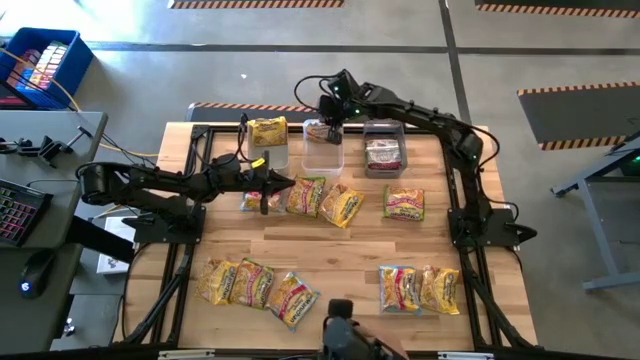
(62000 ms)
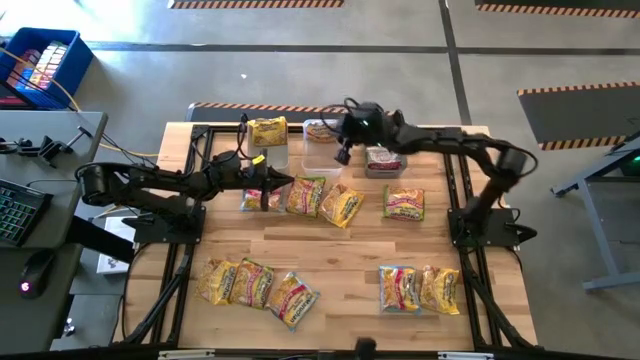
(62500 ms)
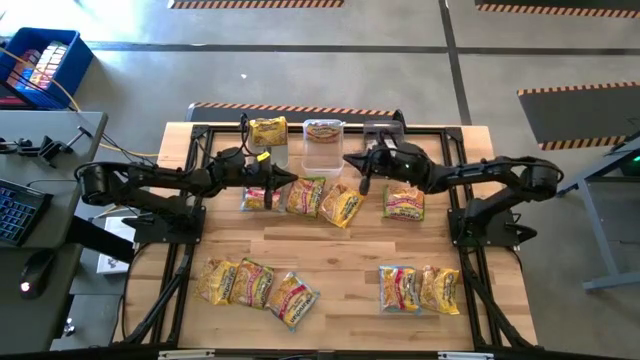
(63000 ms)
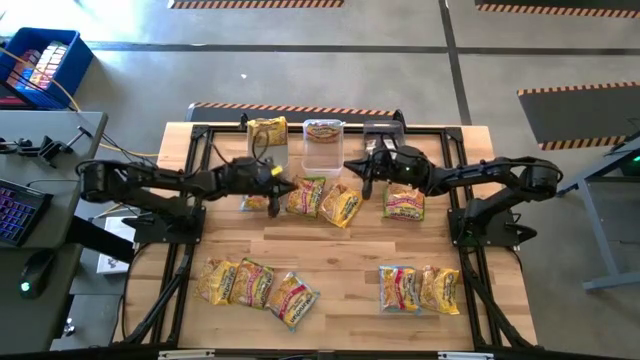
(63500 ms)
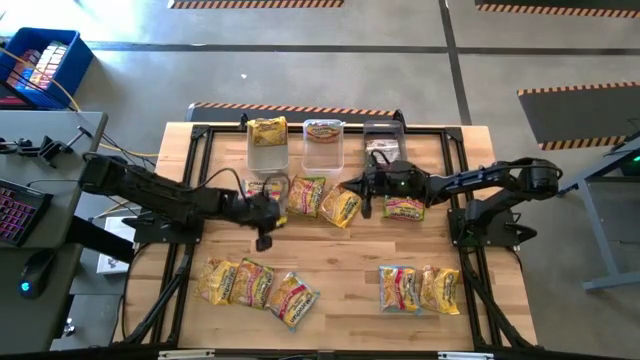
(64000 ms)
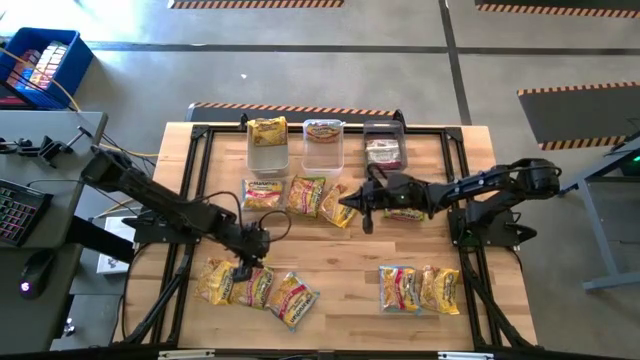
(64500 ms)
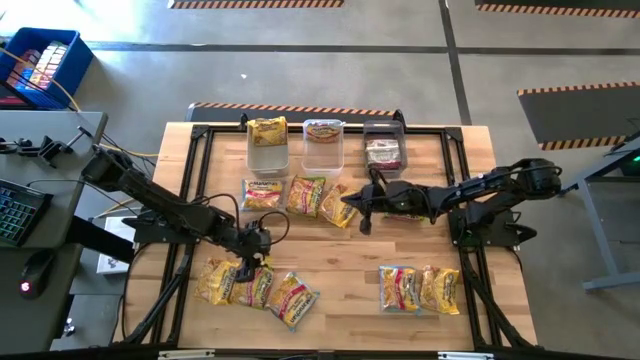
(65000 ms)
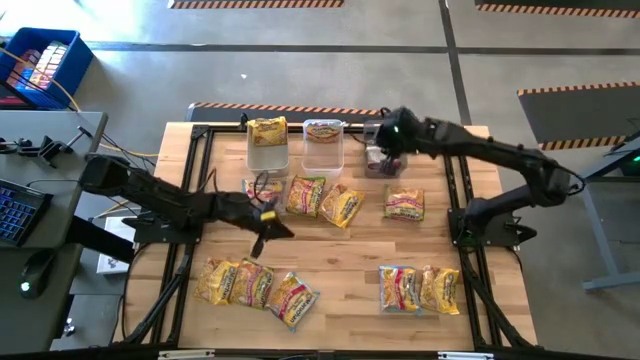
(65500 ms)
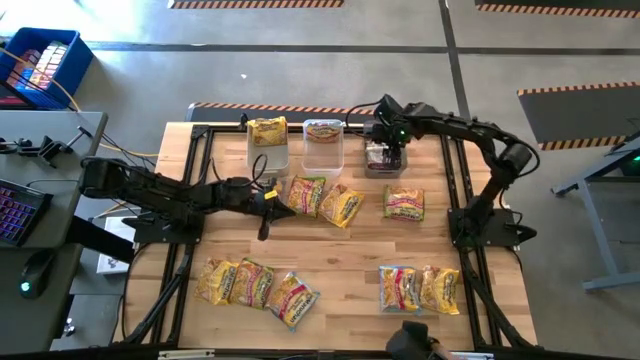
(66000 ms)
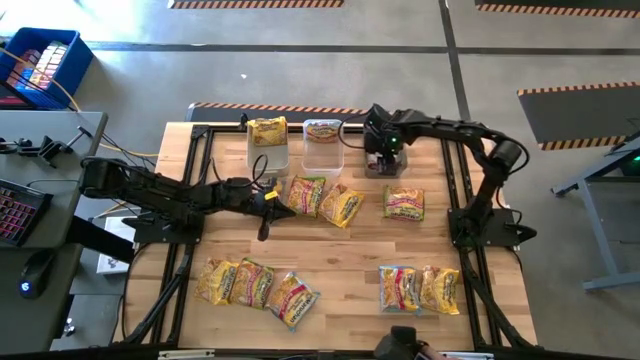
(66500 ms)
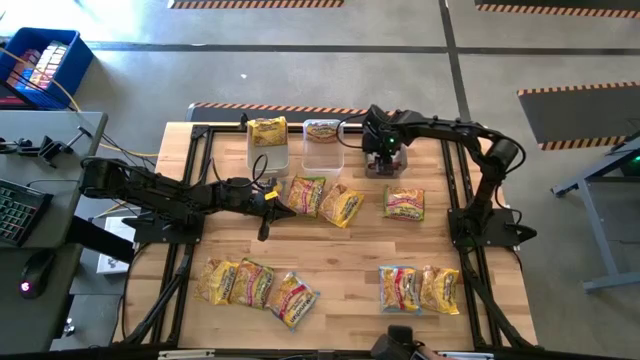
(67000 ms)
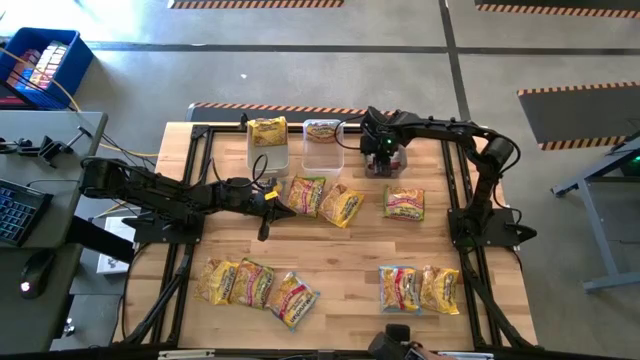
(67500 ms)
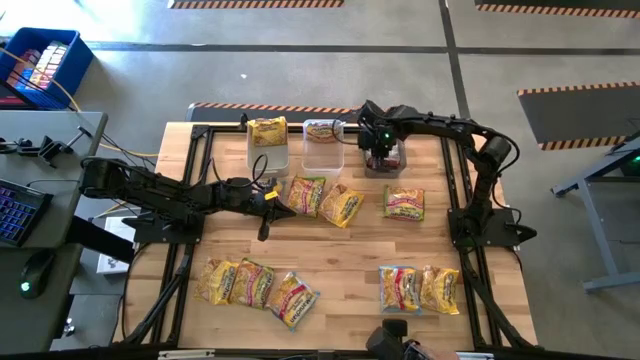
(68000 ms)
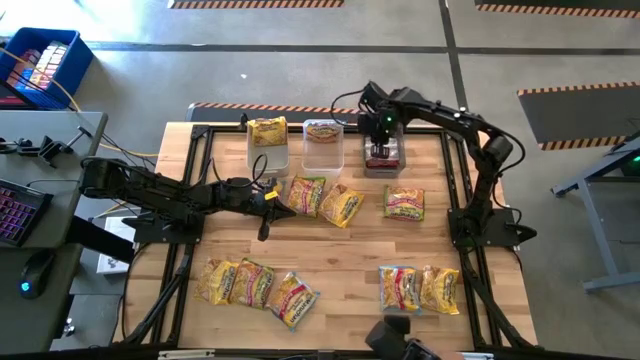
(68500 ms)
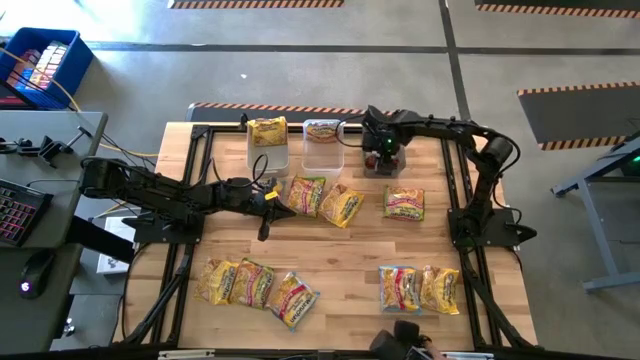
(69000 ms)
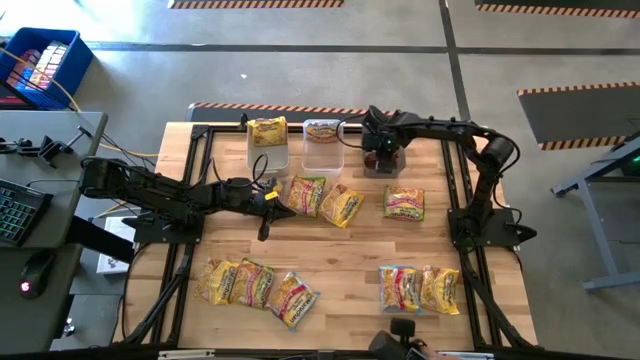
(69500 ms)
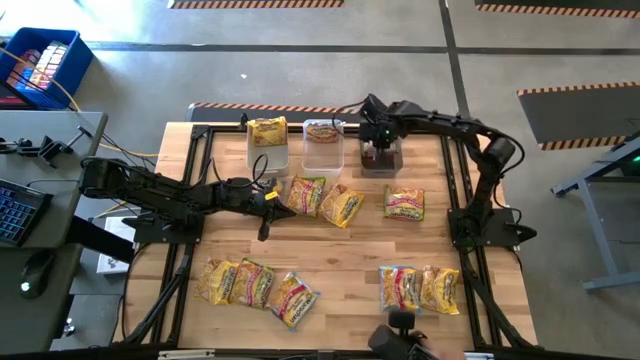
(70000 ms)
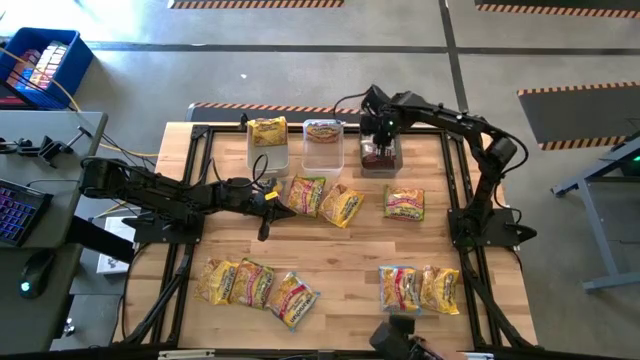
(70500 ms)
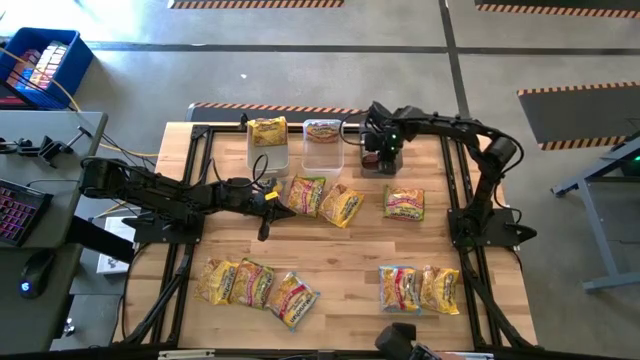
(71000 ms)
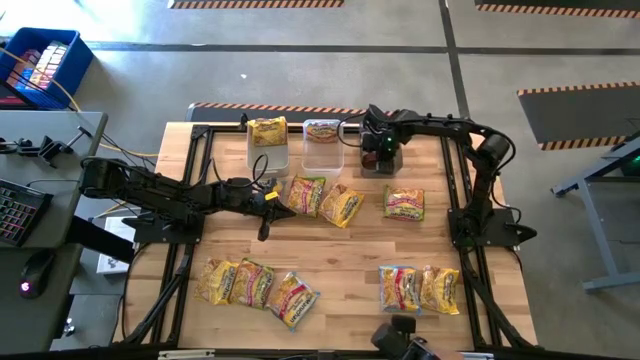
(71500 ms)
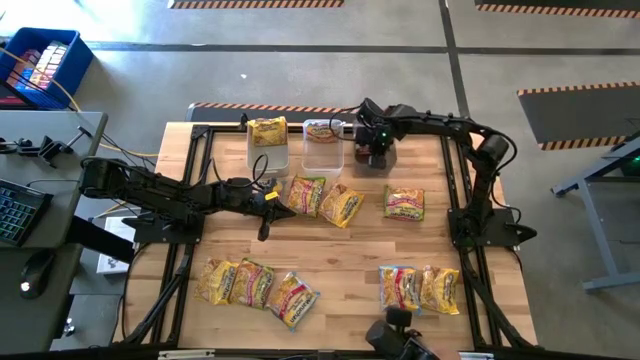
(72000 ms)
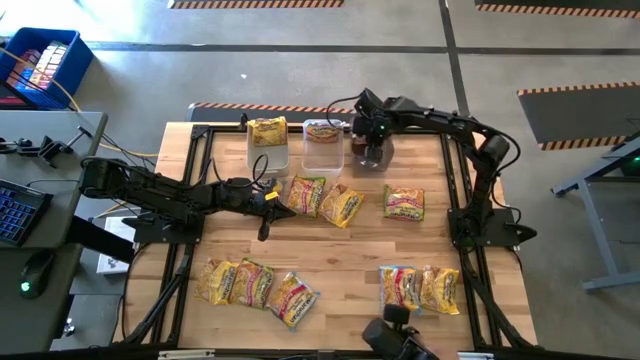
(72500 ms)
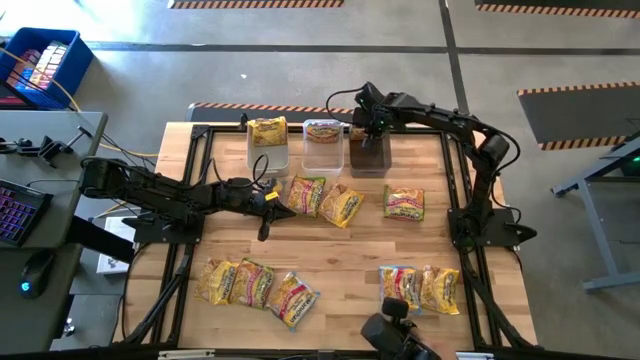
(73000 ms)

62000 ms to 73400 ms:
Task: Sort Maruchan noodles
Adjust the green noodle pack on the transparent black bin

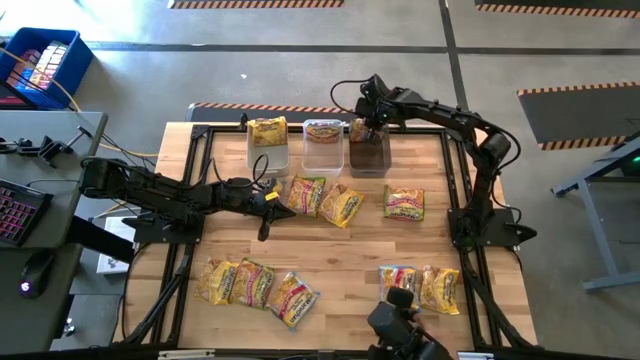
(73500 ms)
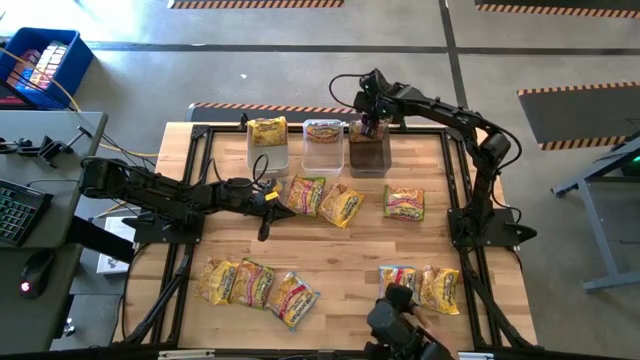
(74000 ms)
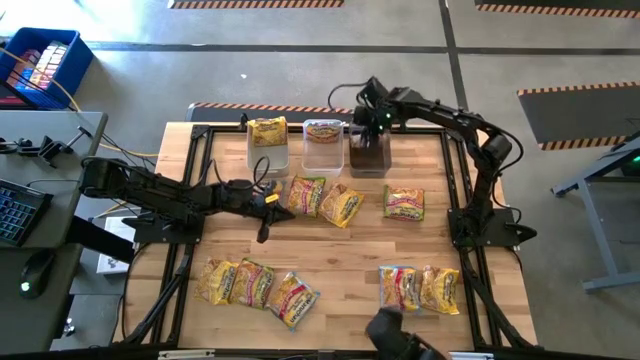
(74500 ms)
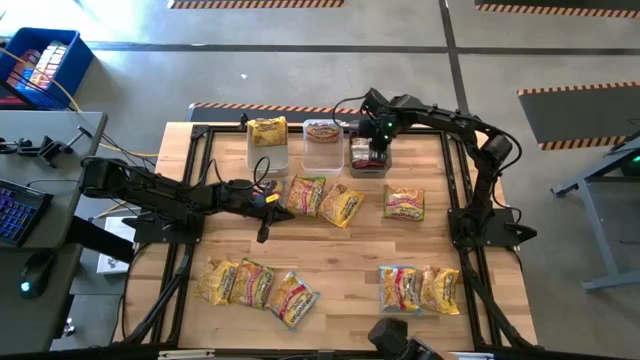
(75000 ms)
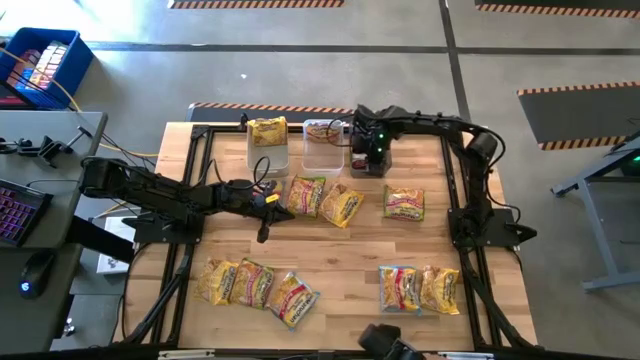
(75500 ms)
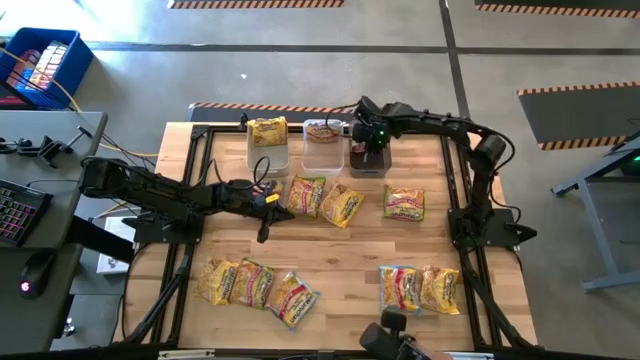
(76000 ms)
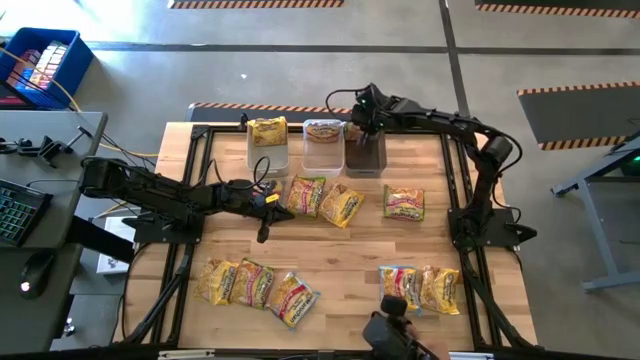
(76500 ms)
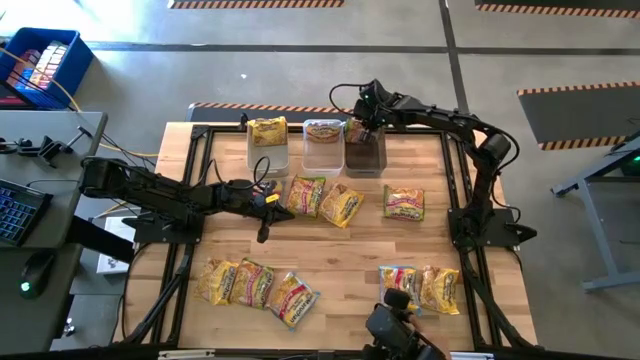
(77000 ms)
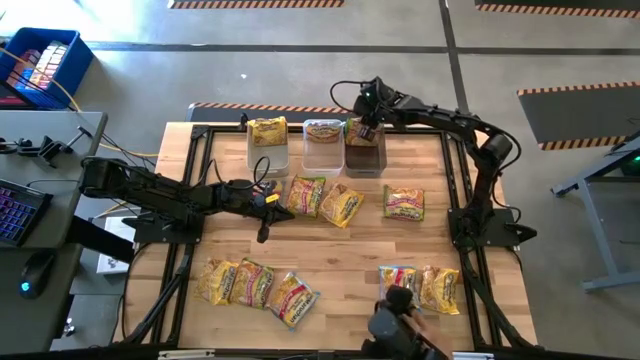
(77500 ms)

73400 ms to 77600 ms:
Adjust the green noodle pack on the transparent black bin

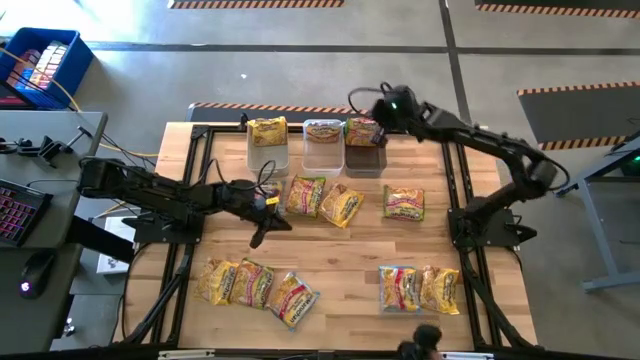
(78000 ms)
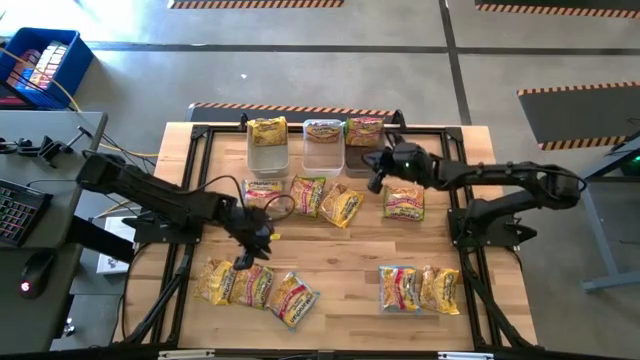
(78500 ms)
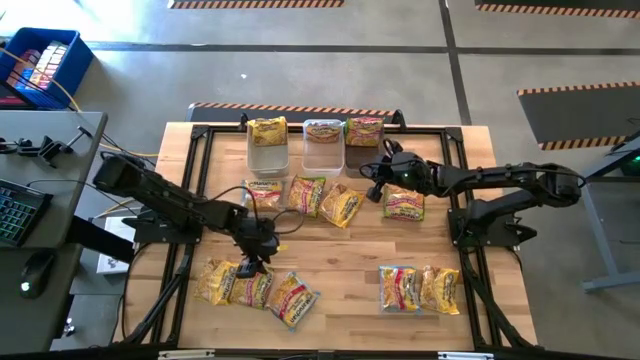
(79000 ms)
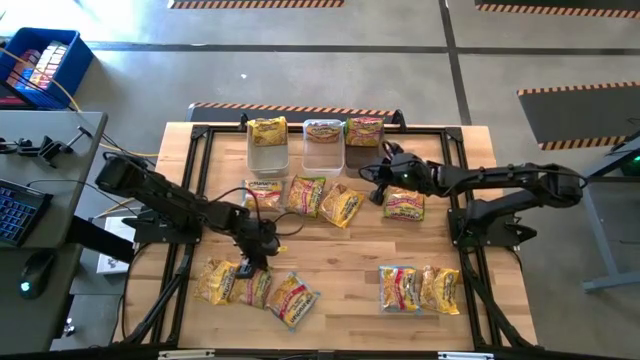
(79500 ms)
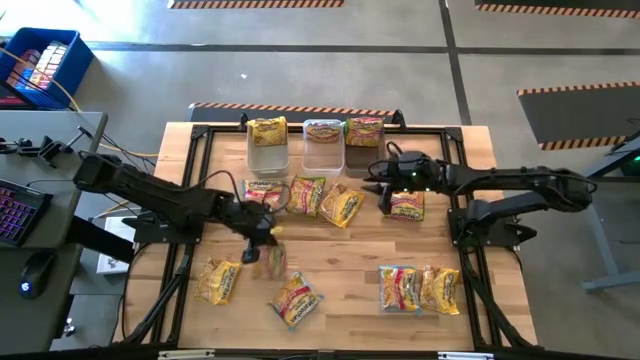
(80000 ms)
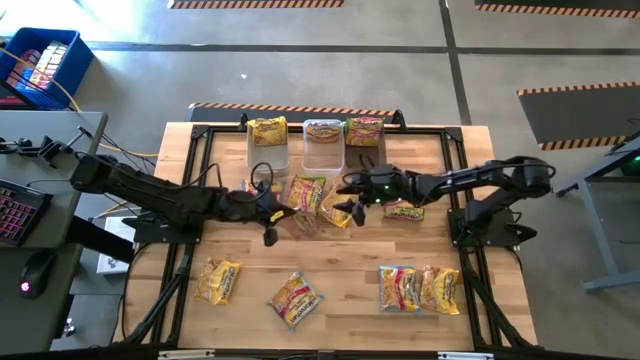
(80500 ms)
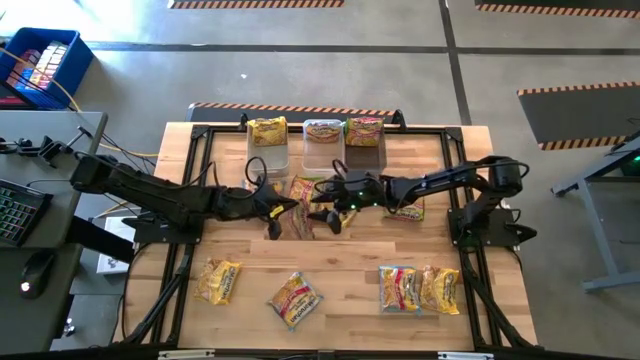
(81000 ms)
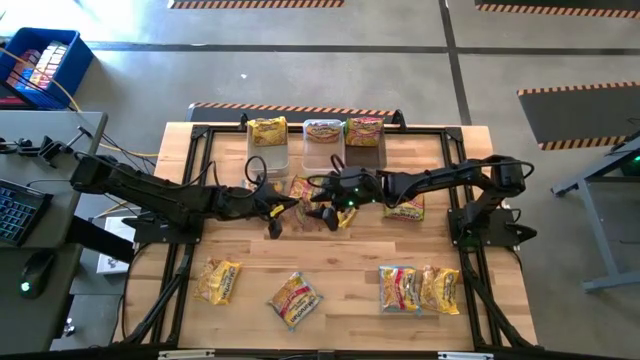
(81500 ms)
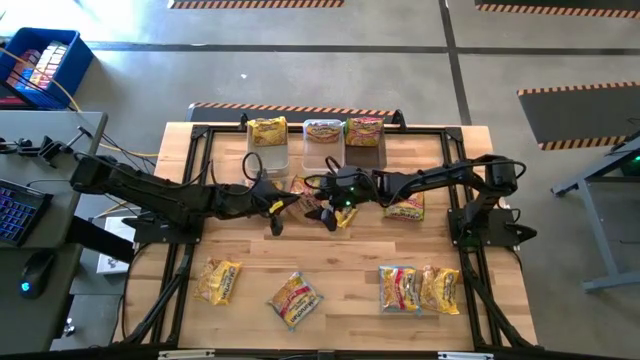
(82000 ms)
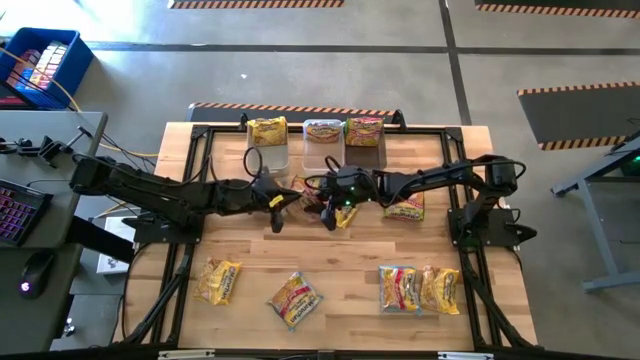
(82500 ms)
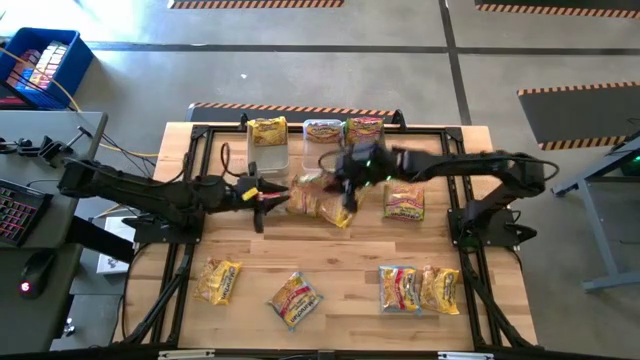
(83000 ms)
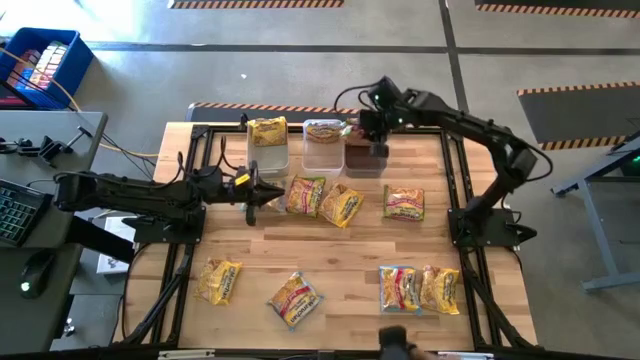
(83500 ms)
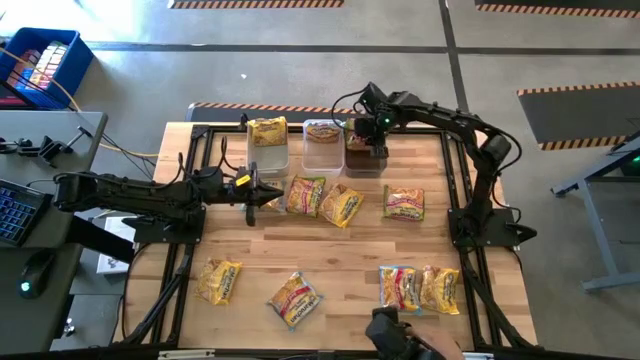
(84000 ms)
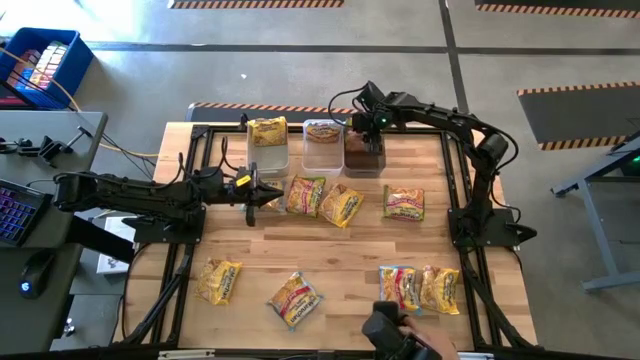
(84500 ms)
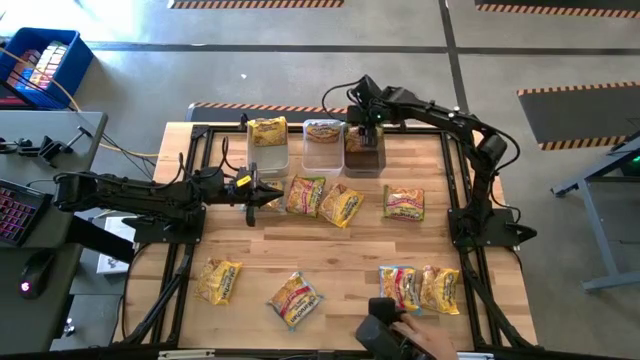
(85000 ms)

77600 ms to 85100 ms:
Put the bottom green noodle pack into the transparent black bin
